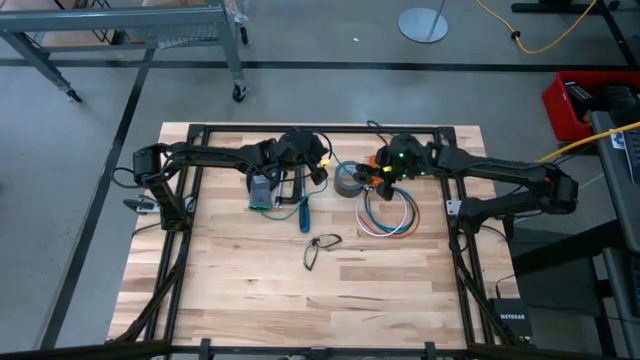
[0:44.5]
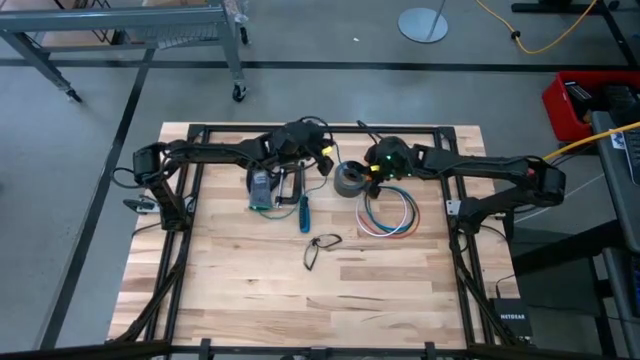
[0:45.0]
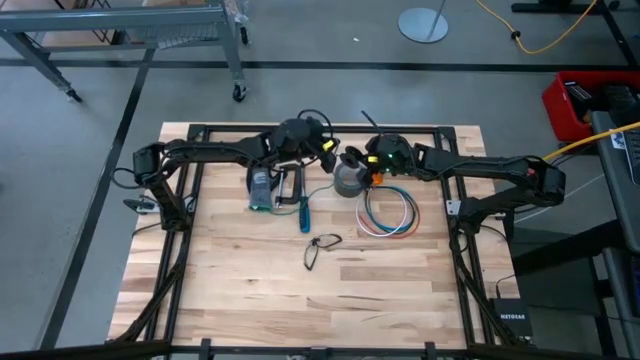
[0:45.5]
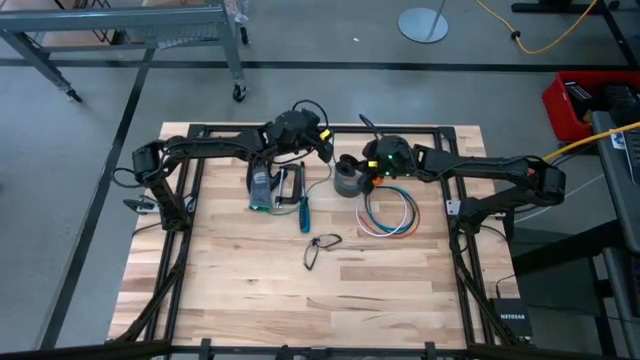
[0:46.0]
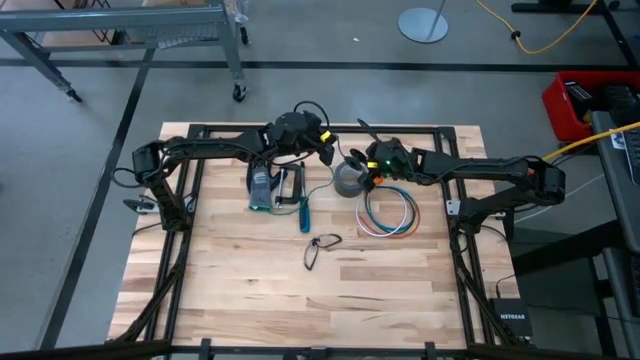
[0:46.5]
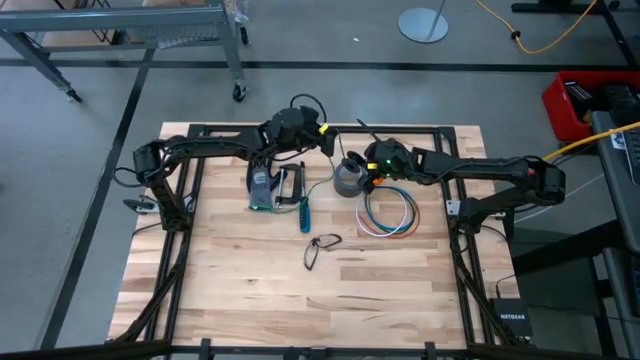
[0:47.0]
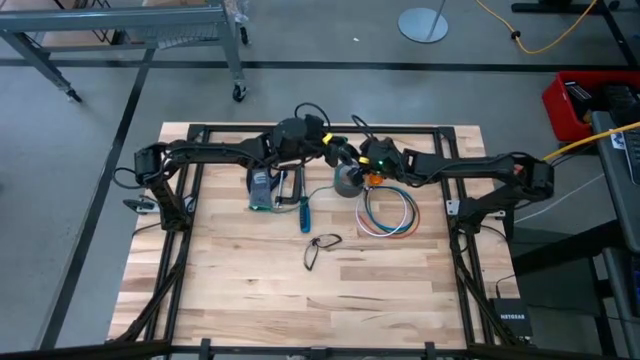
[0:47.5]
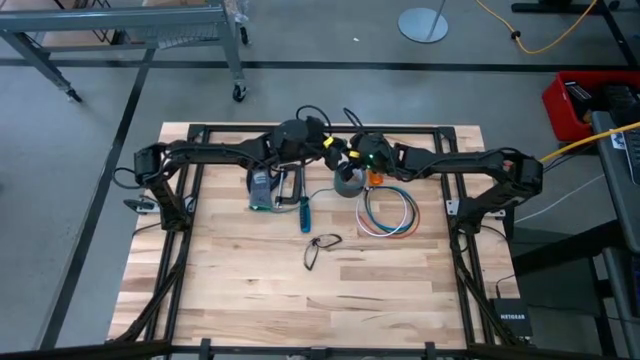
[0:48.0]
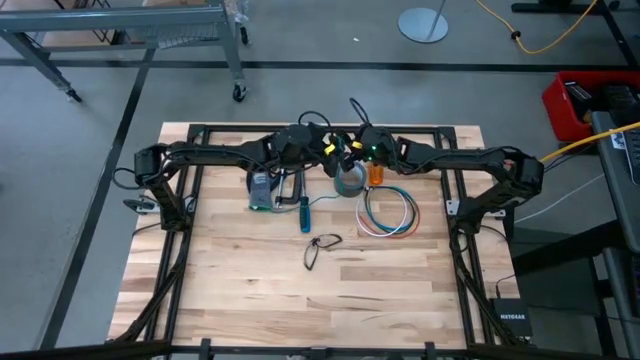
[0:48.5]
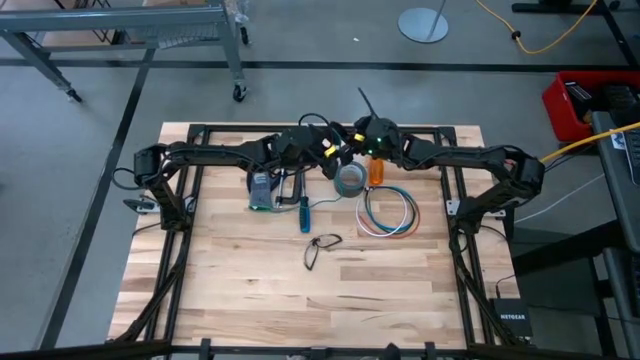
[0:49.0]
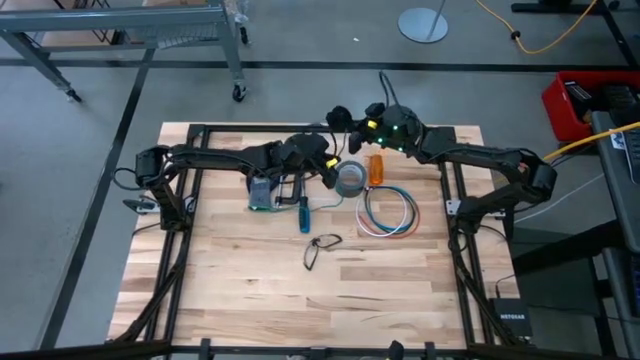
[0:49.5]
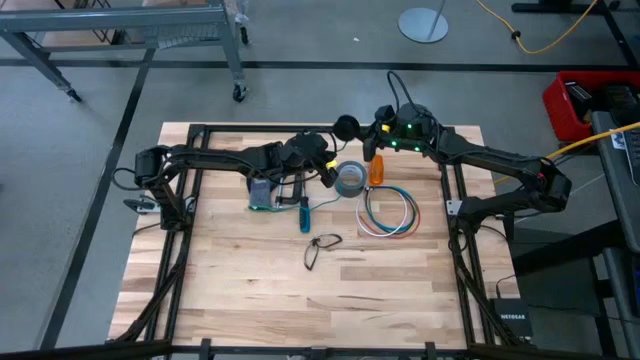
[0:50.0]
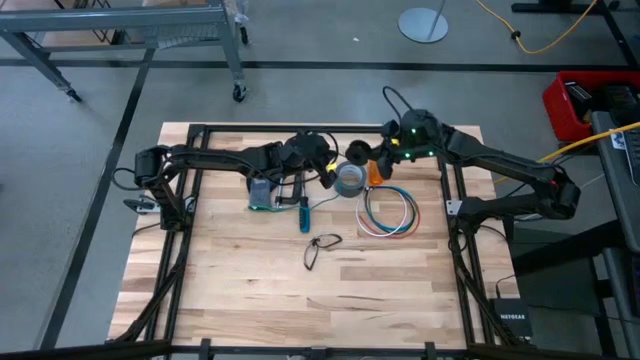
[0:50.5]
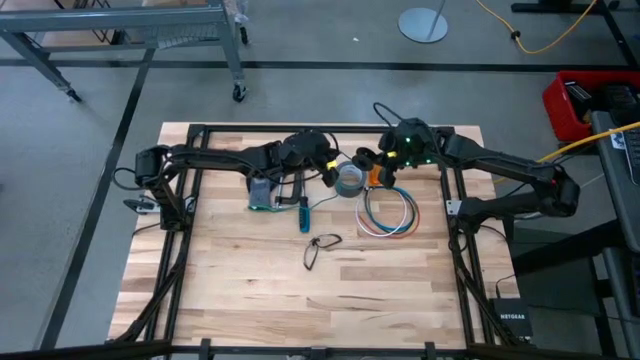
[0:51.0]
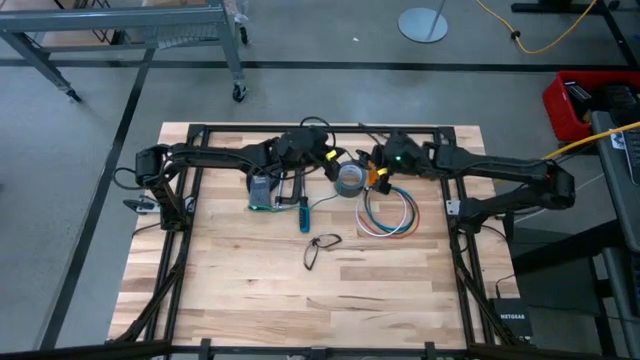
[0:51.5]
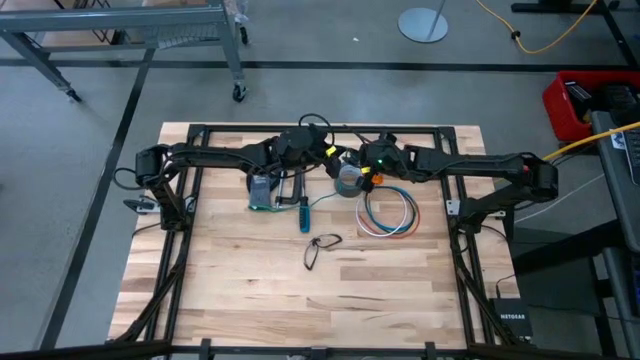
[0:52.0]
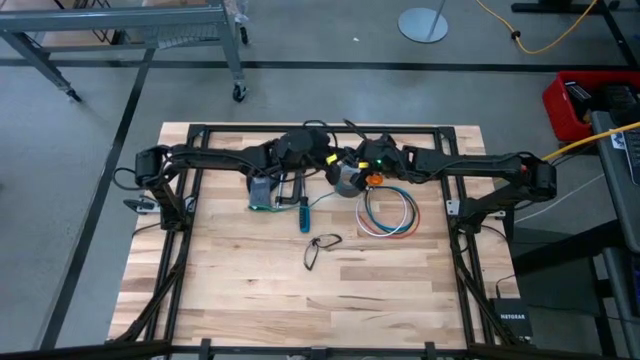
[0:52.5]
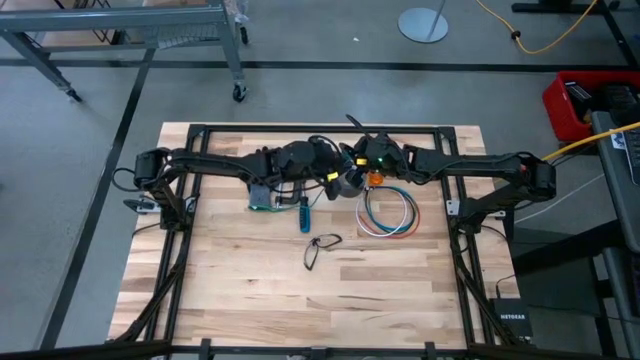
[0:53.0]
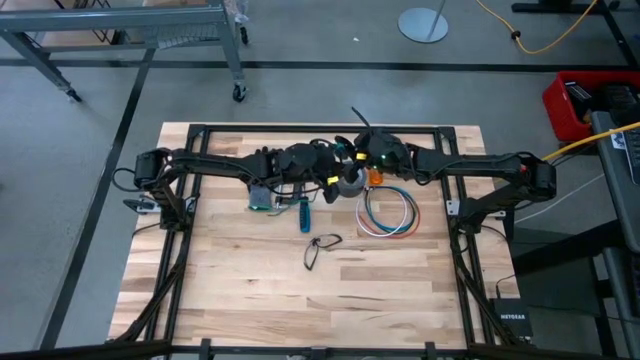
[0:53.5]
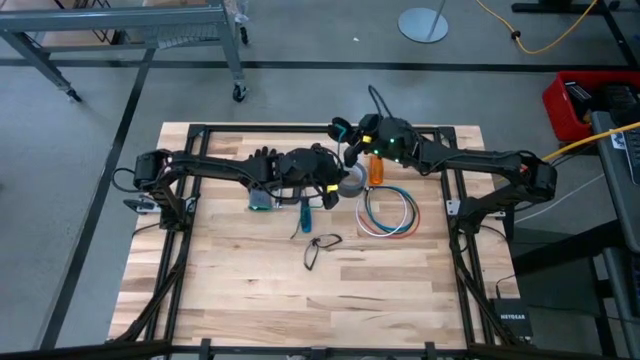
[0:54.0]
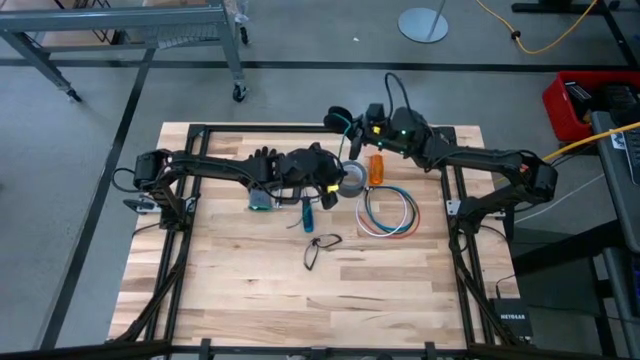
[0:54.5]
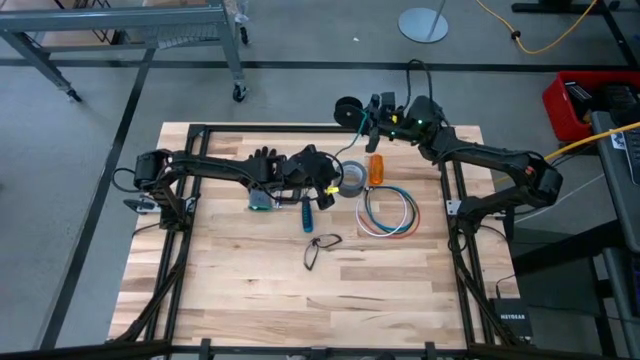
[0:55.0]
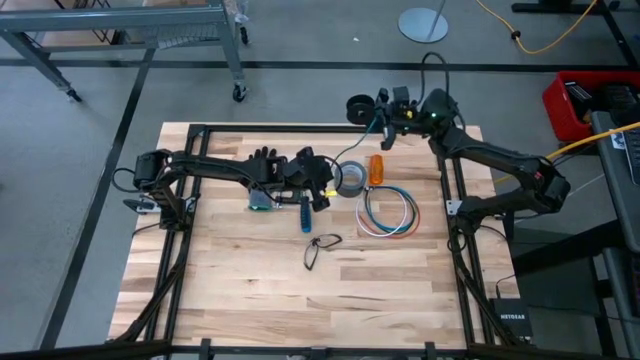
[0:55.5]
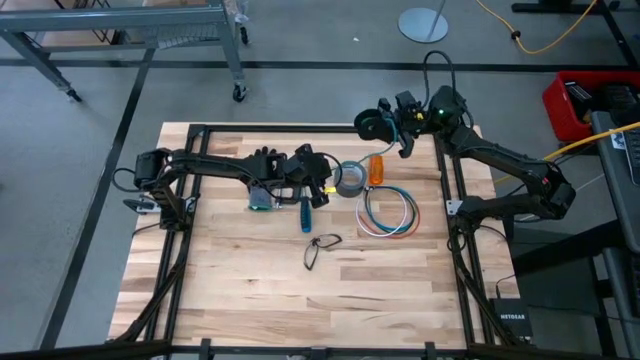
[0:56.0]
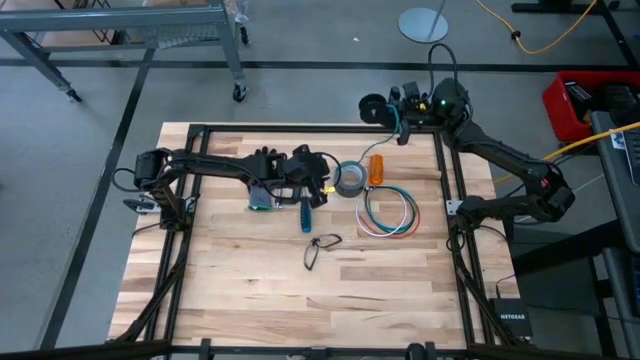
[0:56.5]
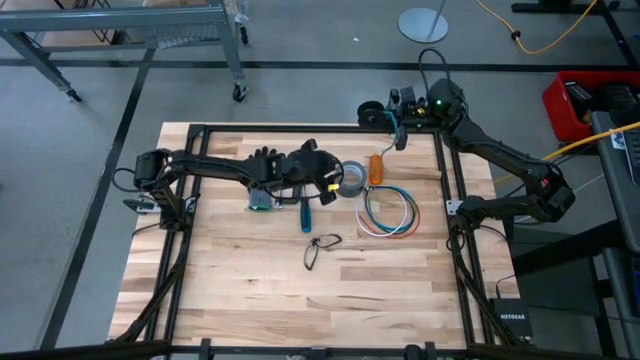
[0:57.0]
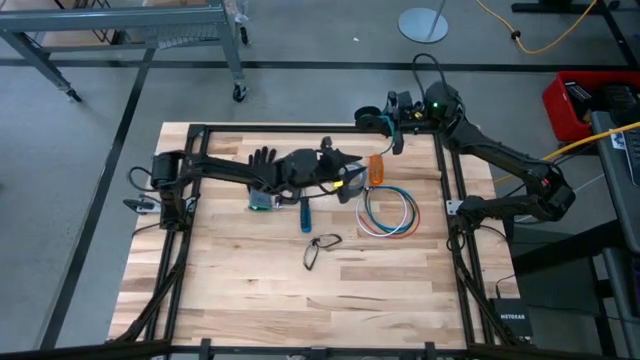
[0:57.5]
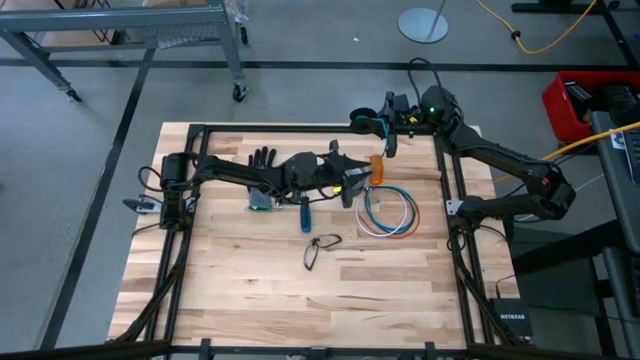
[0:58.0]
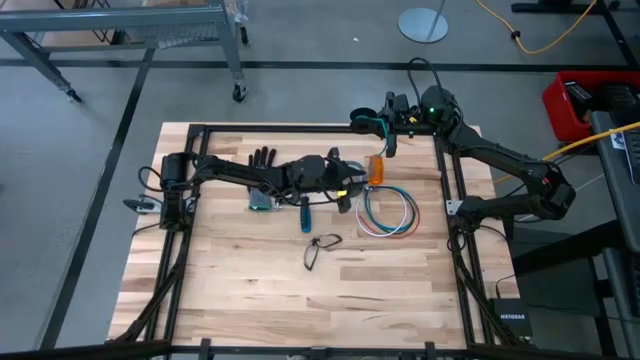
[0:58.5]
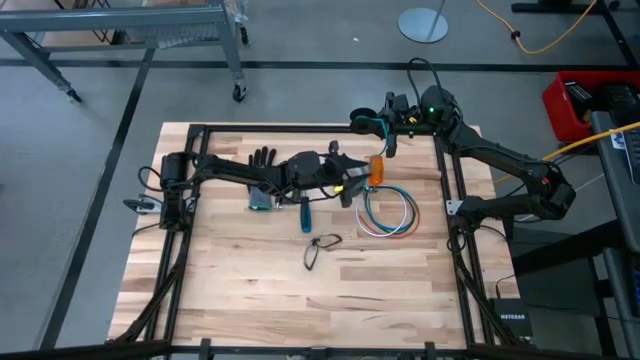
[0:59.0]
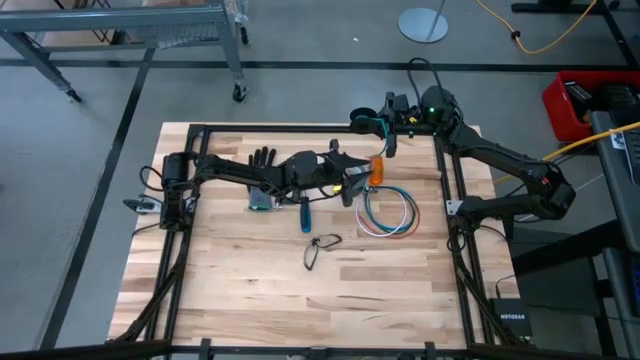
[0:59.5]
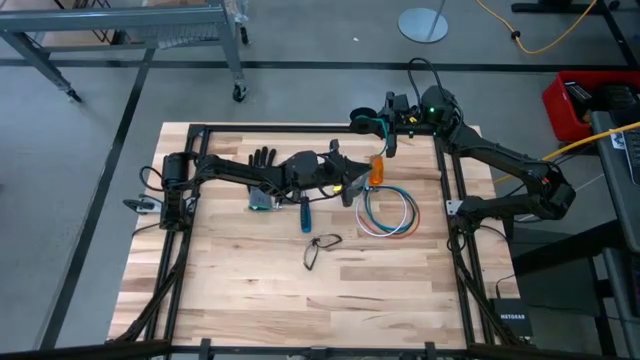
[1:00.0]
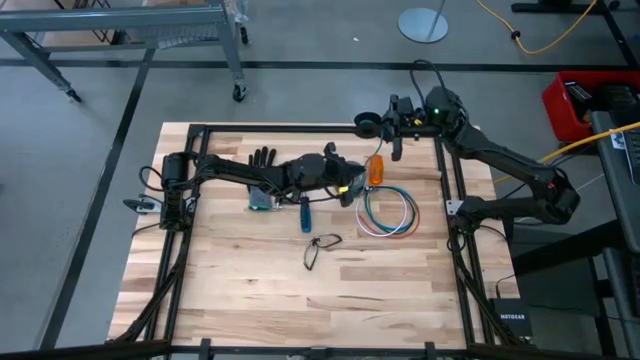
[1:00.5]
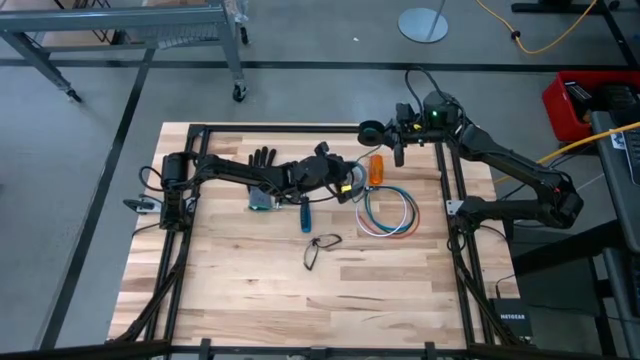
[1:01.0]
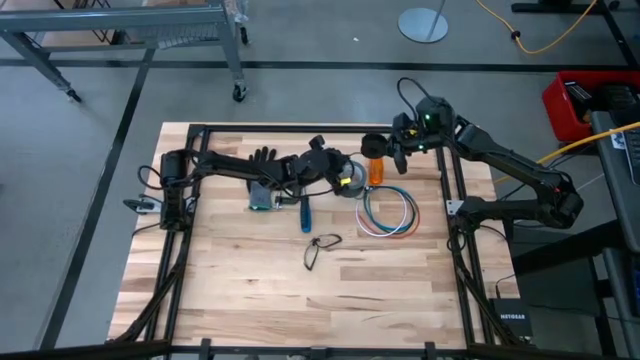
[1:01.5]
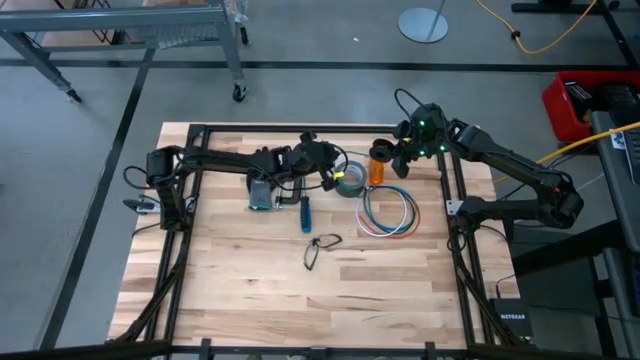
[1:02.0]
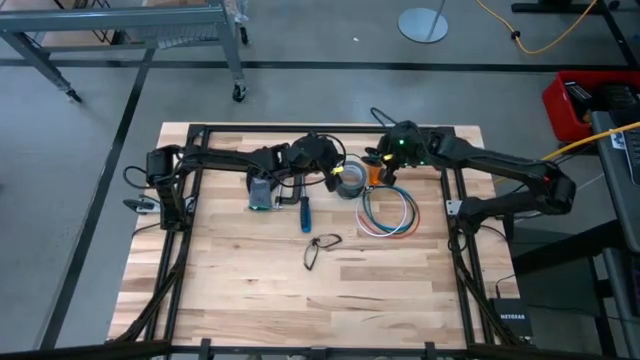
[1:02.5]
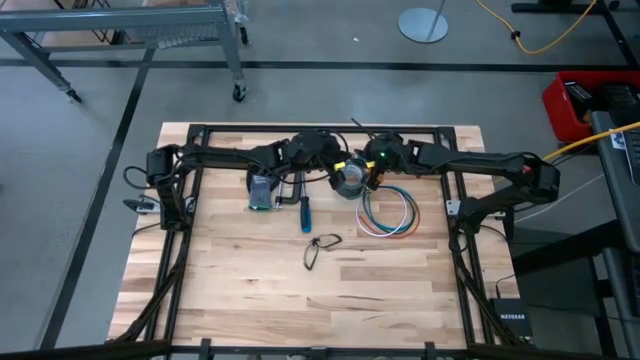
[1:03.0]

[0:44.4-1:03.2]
Task: Coil cords
Coil the green wire onto the spool
